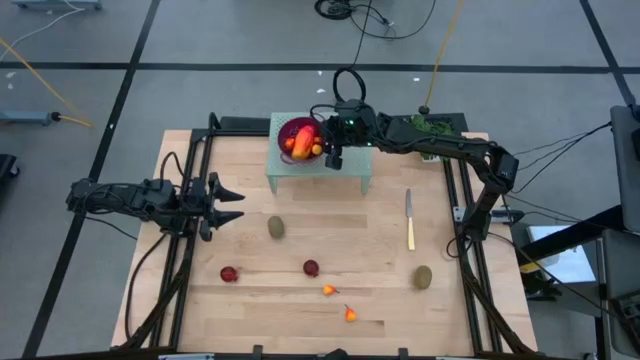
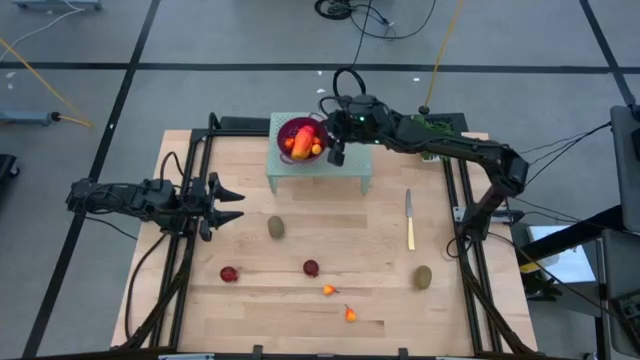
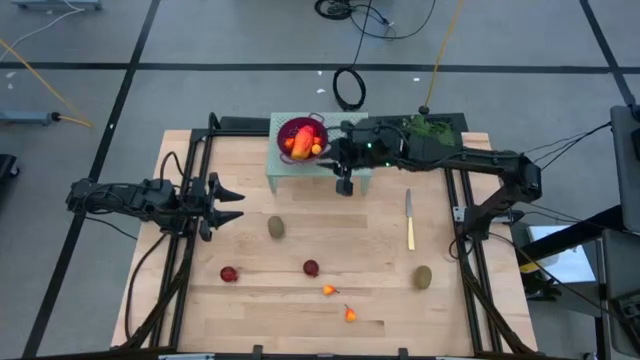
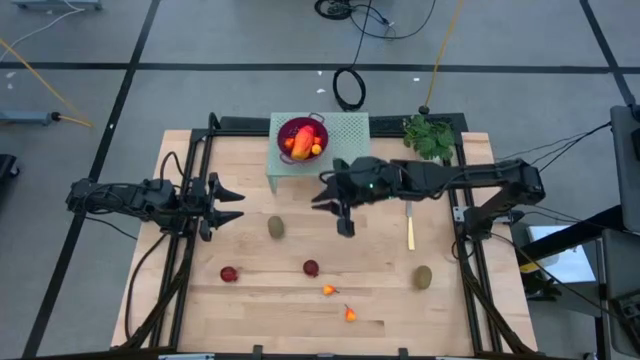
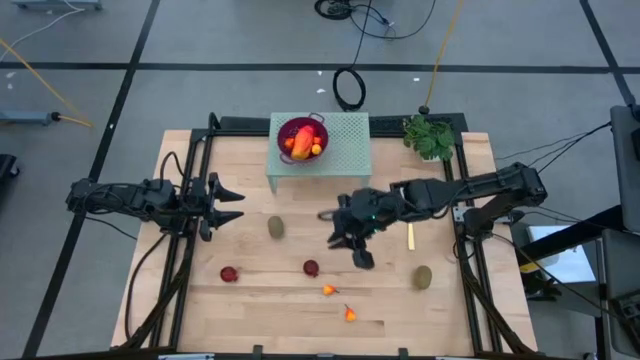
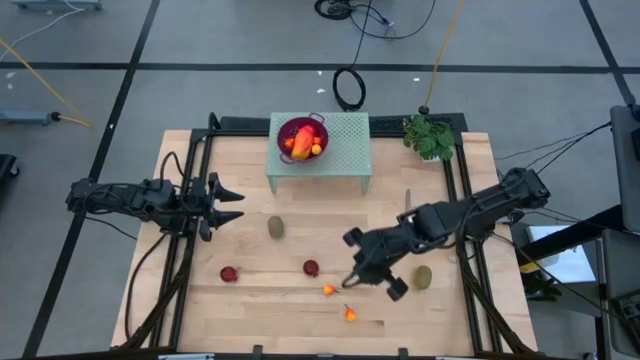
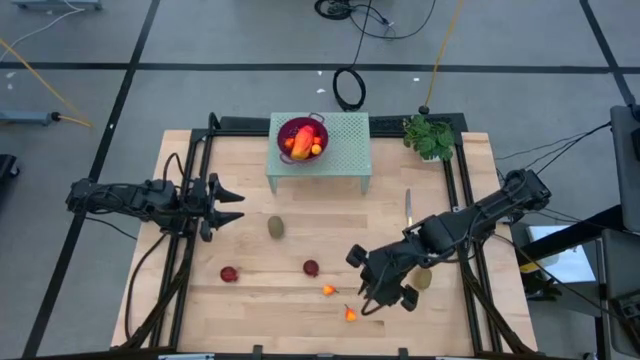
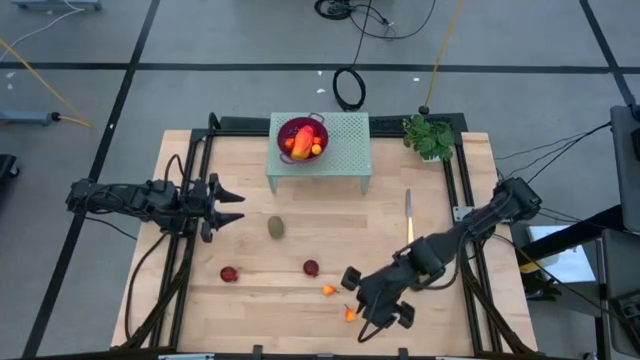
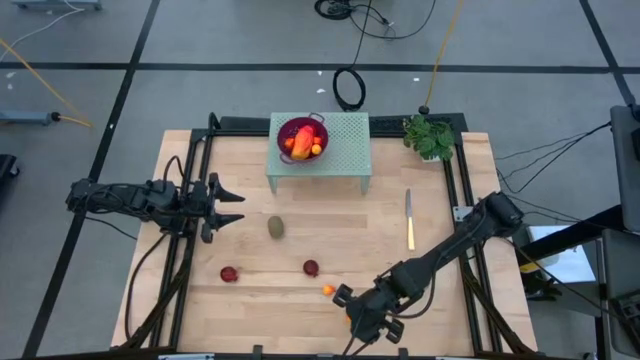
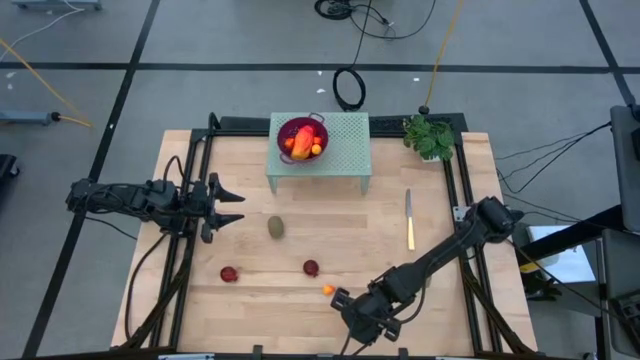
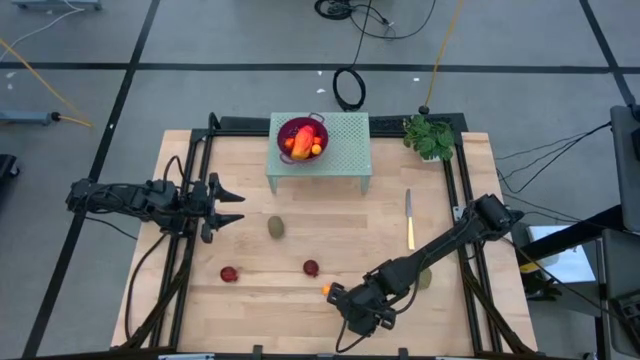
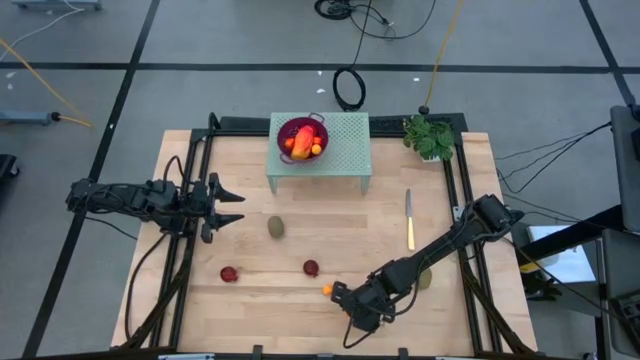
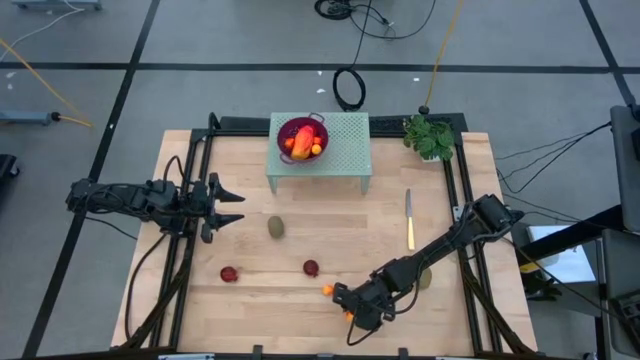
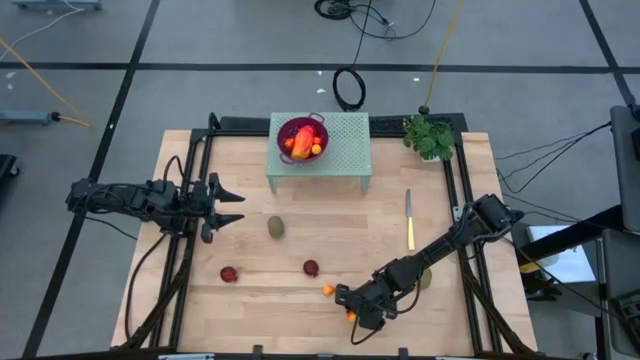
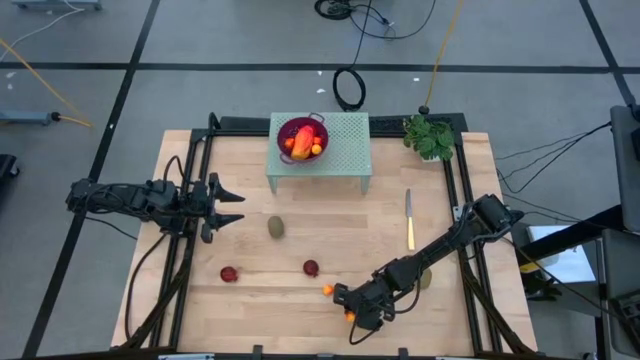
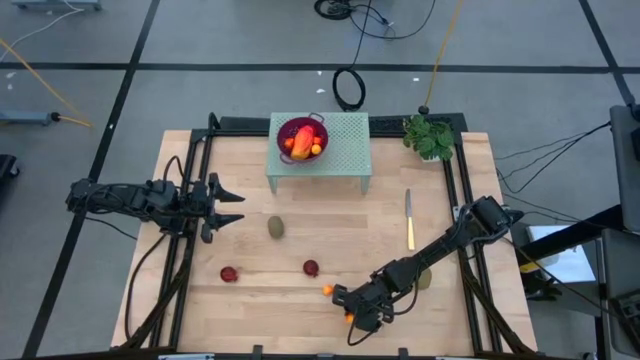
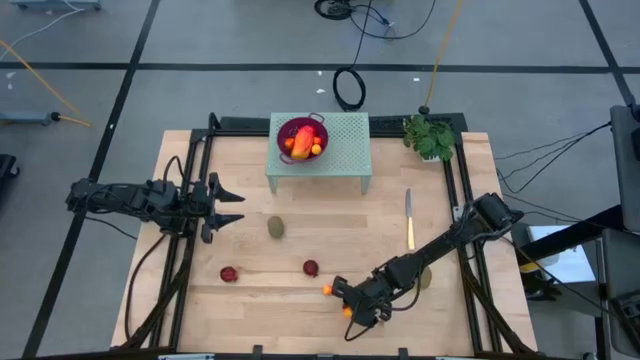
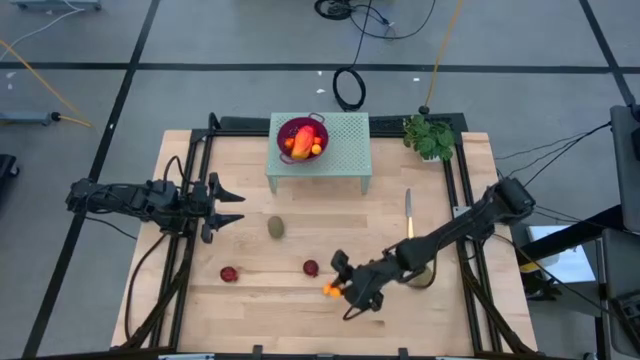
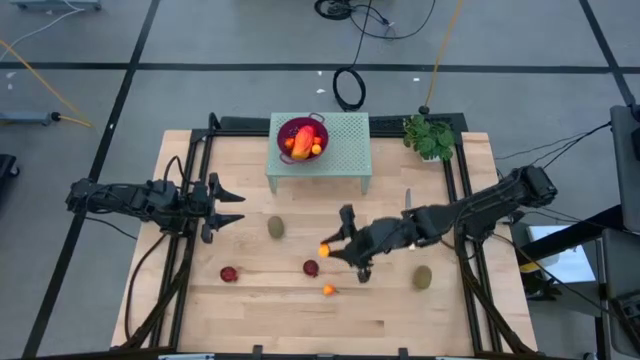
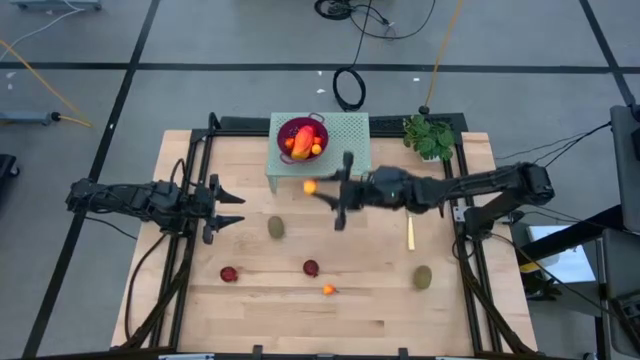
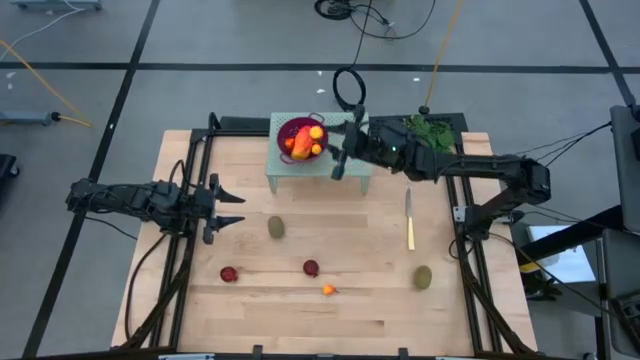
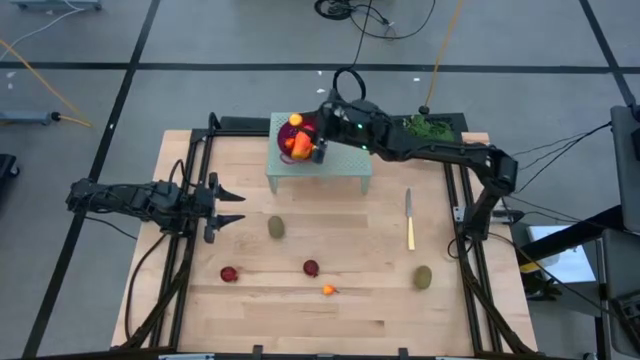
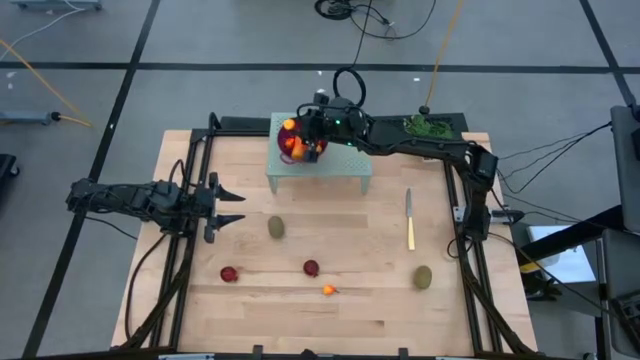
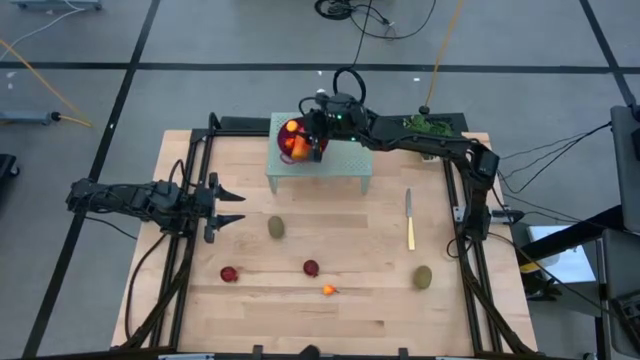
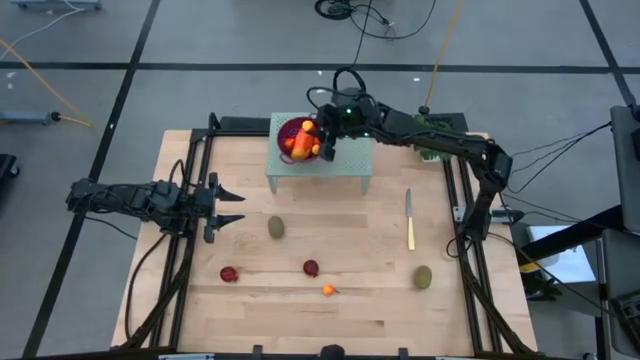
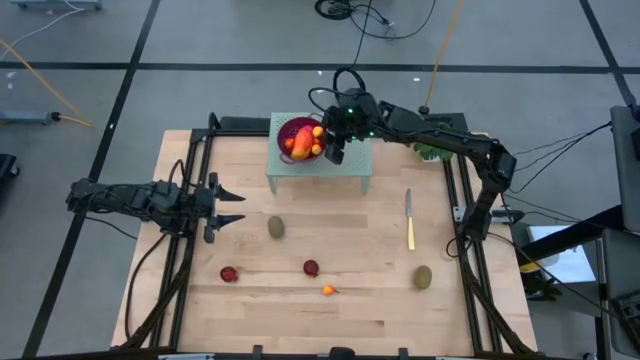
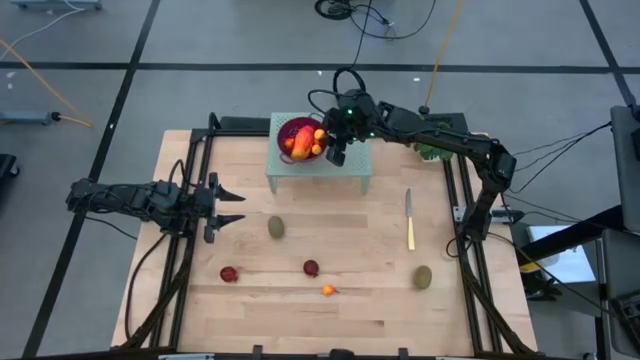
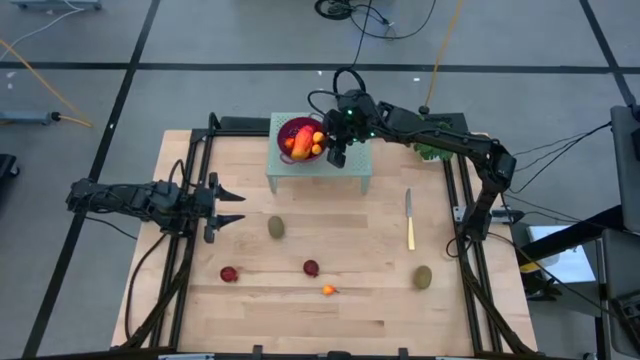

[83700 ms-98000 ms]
Task: Pick & Place Fruit
Put the pear into the violet strainer bowl on the shelf

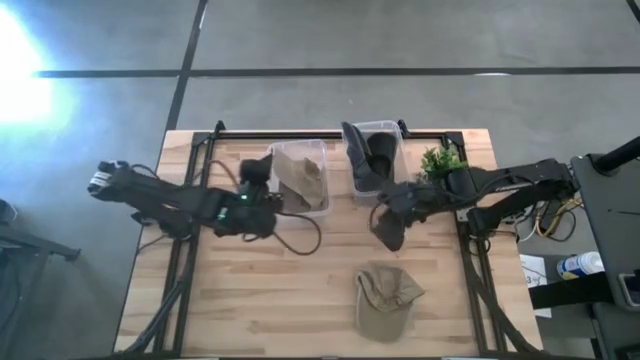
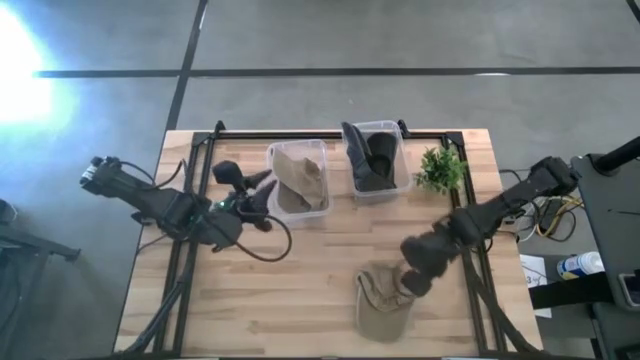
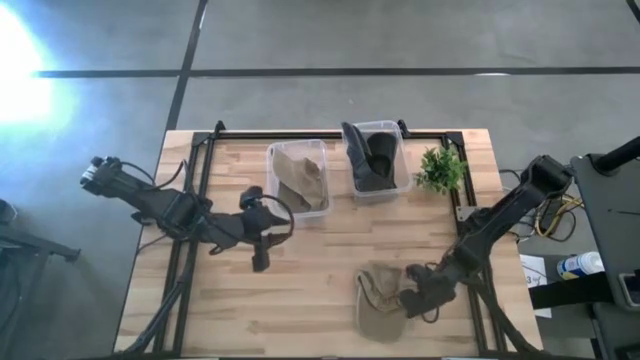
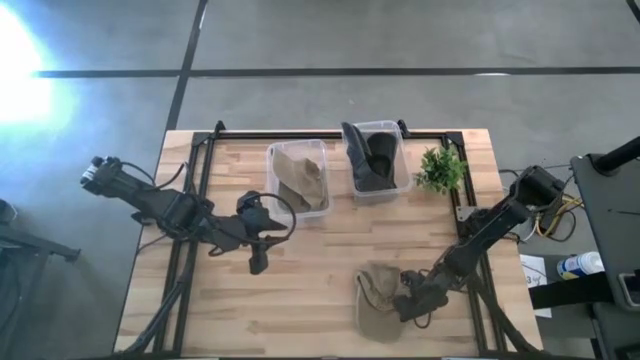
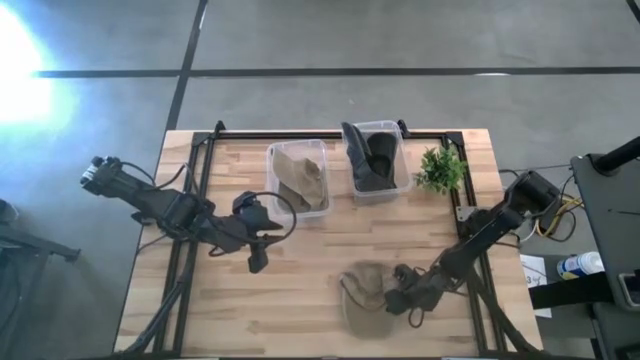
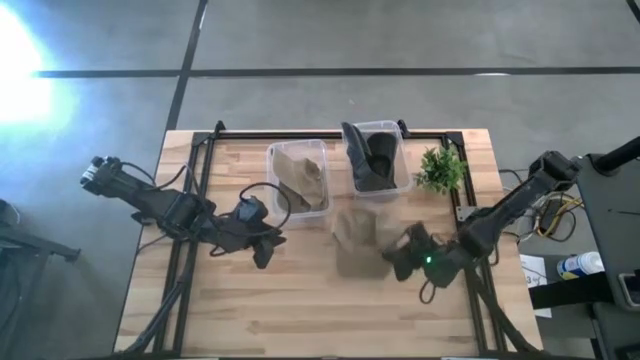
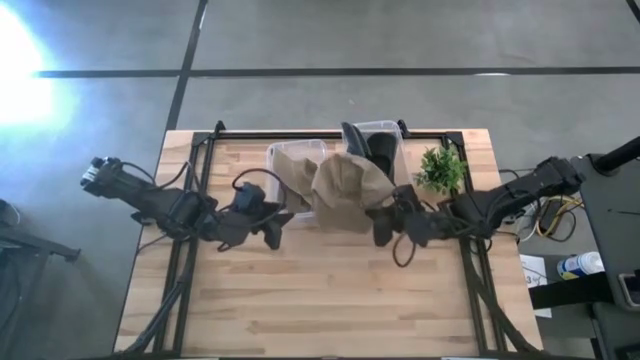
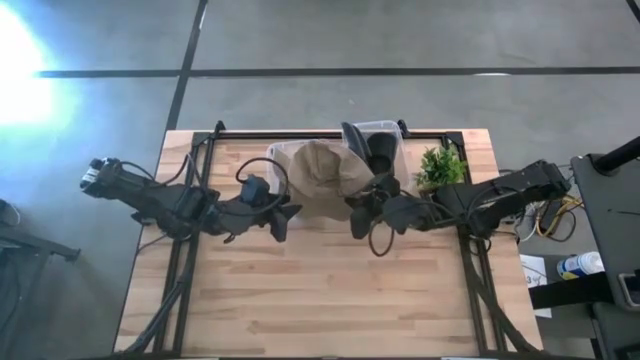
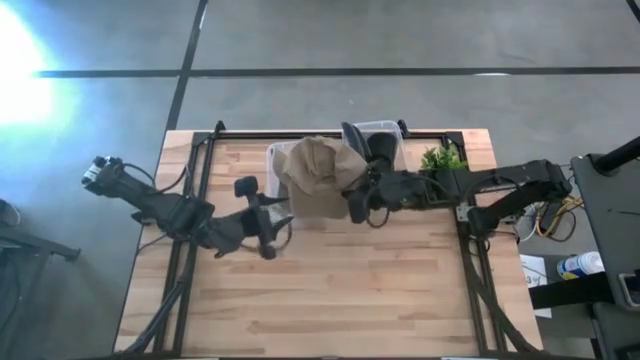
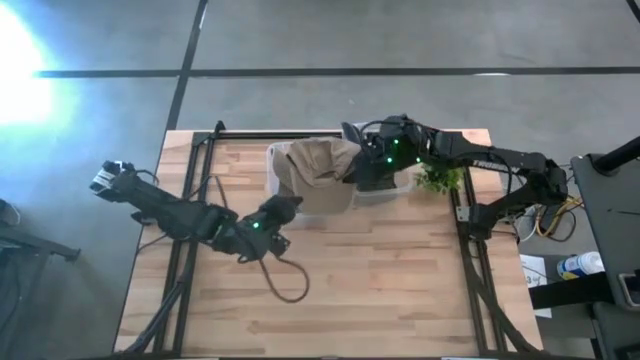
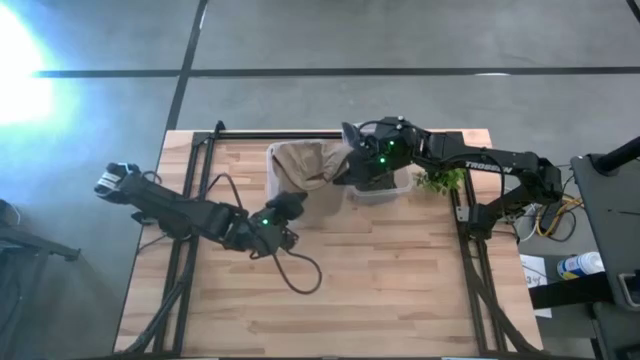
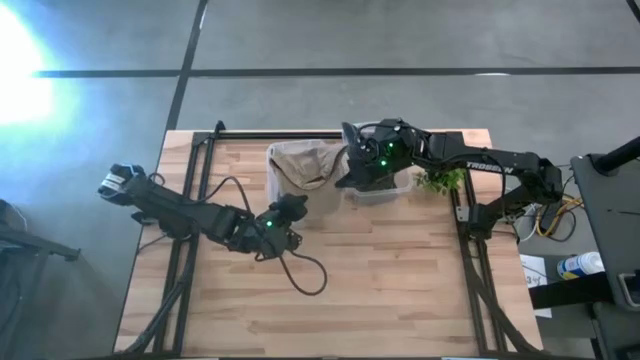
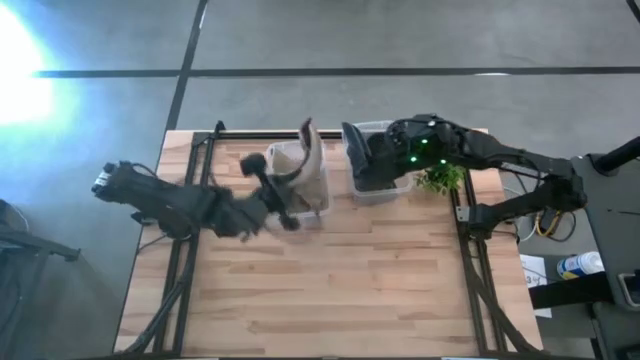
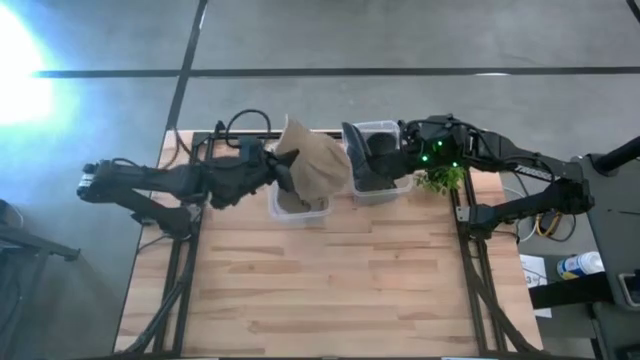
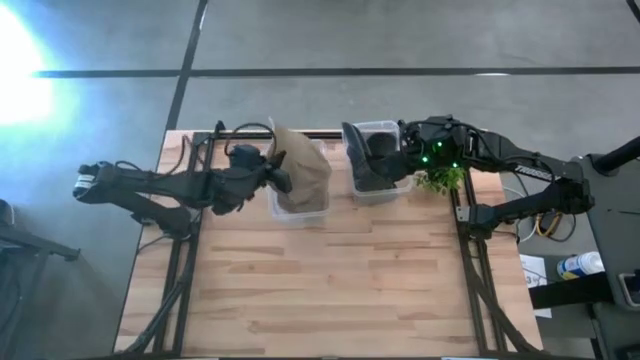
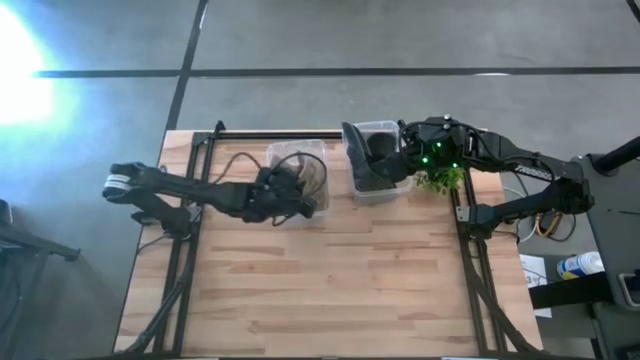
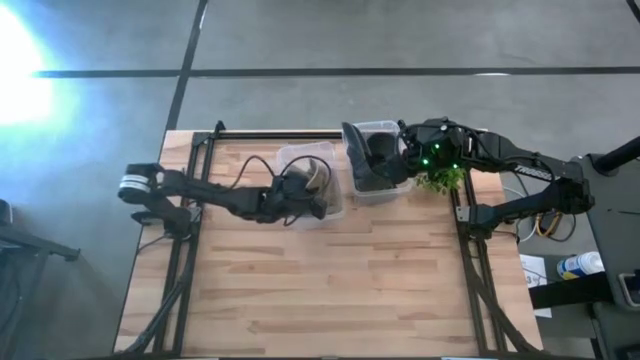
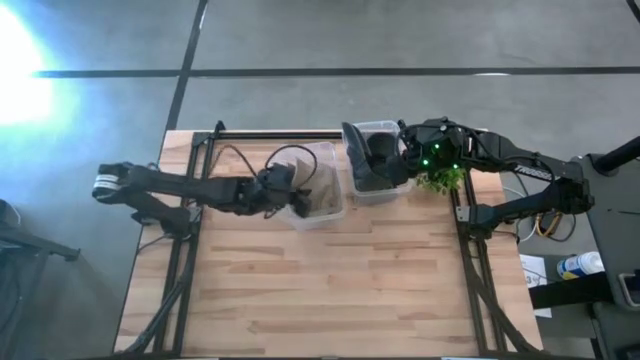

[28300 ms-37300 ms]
Task: Pick & Place hat
Put the brown cap into the left transparent bin
